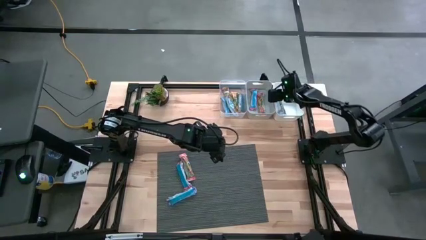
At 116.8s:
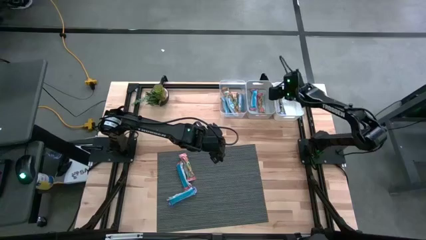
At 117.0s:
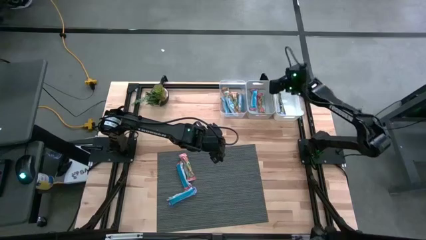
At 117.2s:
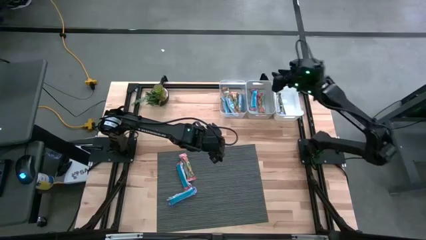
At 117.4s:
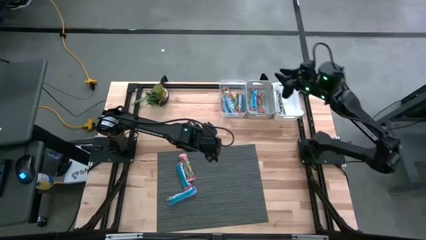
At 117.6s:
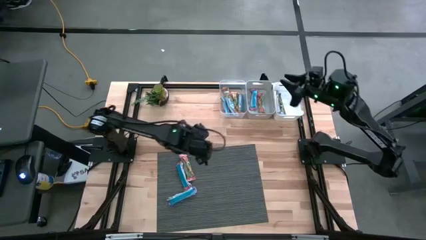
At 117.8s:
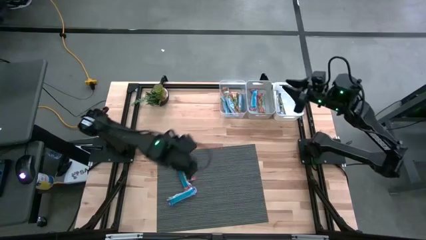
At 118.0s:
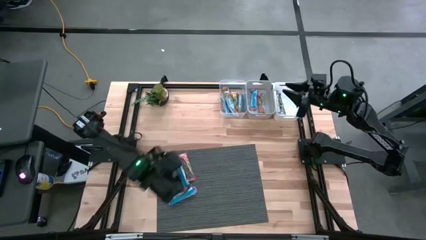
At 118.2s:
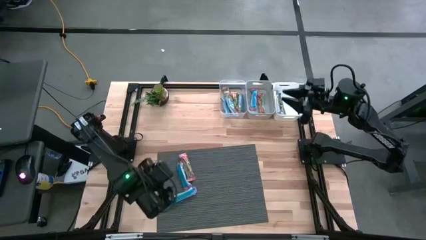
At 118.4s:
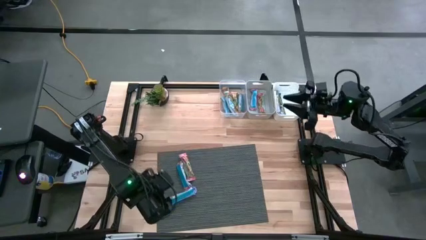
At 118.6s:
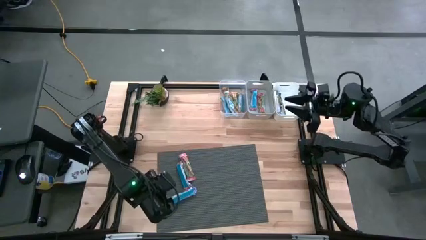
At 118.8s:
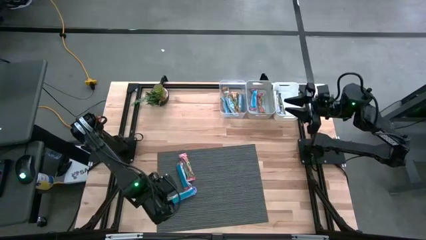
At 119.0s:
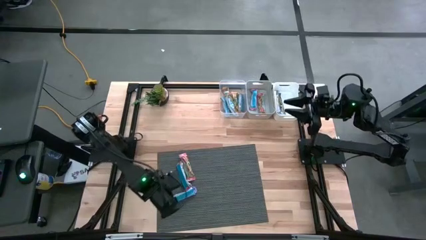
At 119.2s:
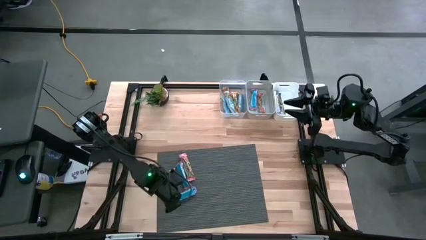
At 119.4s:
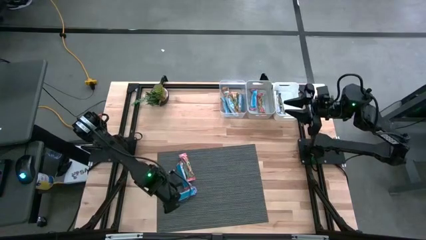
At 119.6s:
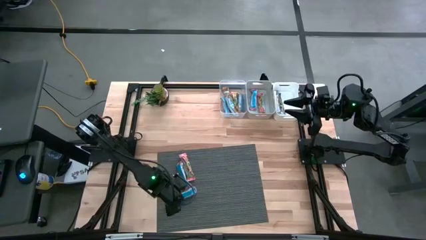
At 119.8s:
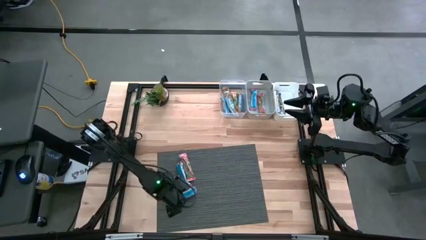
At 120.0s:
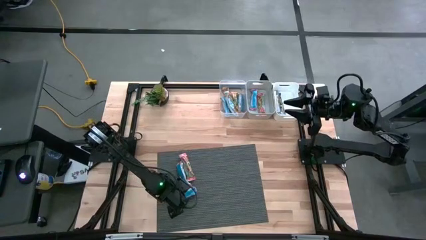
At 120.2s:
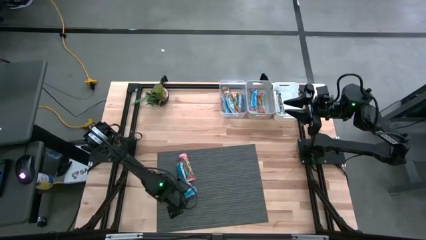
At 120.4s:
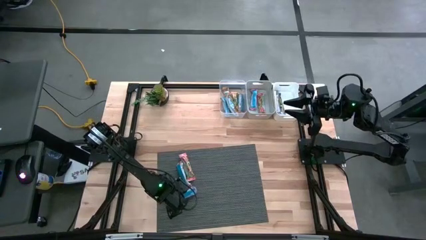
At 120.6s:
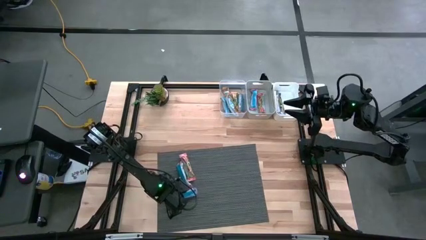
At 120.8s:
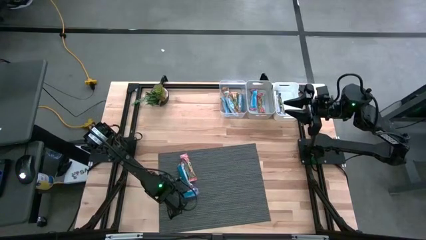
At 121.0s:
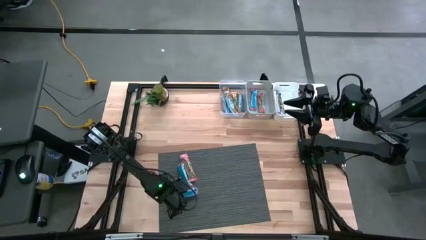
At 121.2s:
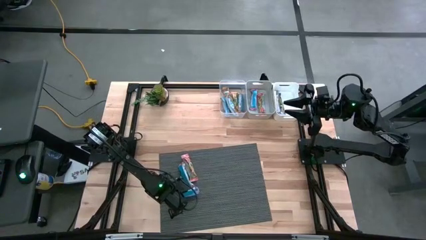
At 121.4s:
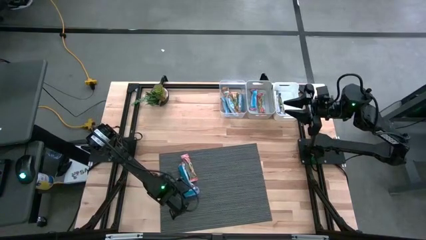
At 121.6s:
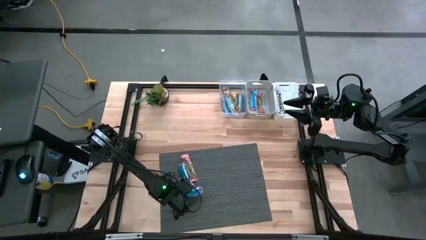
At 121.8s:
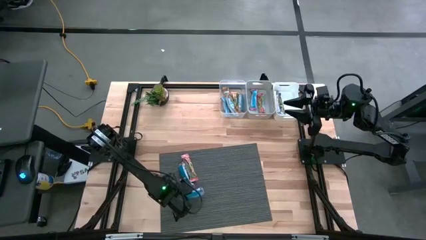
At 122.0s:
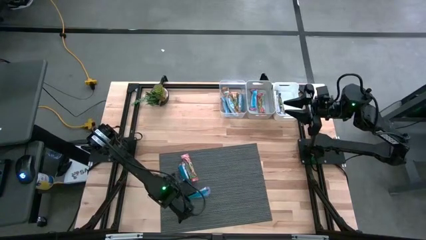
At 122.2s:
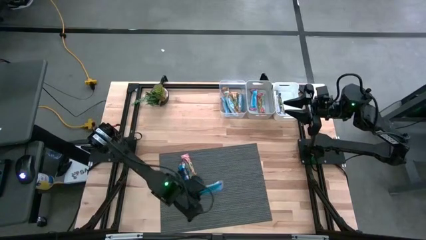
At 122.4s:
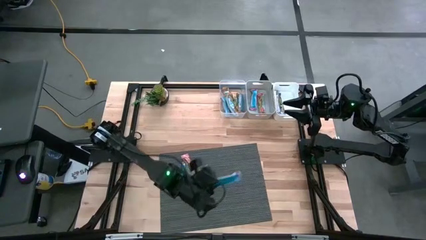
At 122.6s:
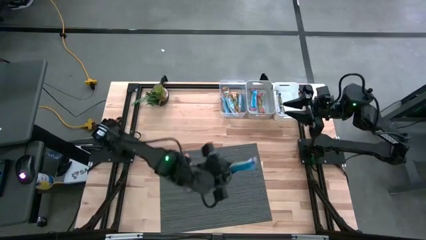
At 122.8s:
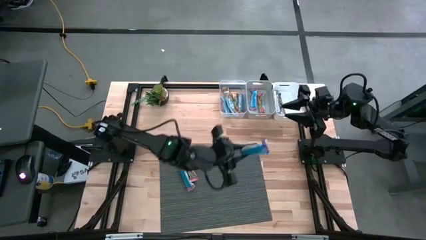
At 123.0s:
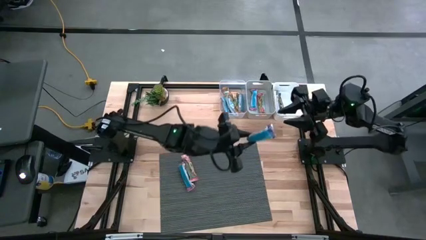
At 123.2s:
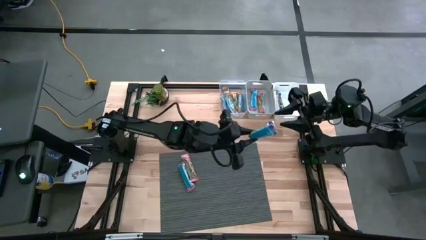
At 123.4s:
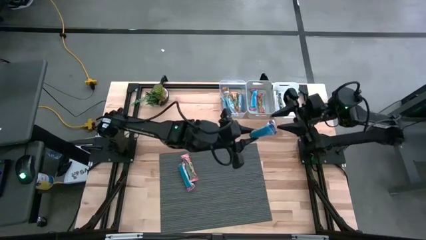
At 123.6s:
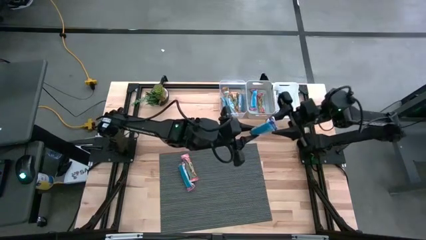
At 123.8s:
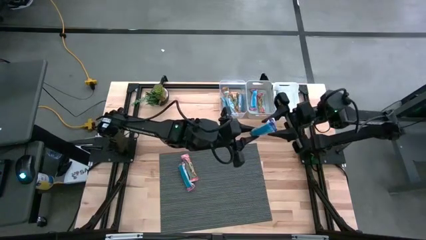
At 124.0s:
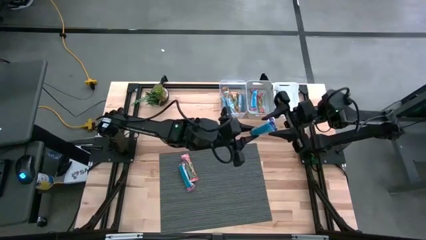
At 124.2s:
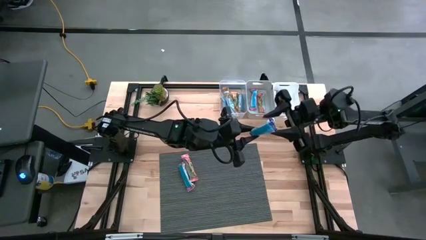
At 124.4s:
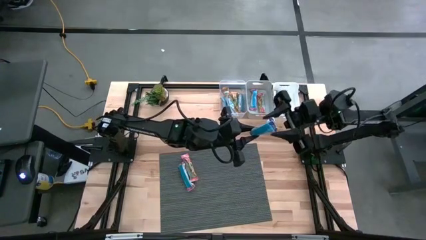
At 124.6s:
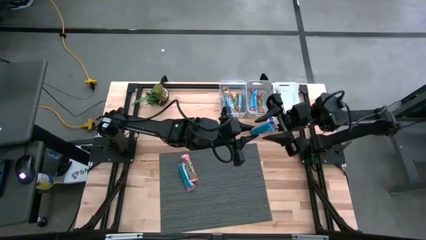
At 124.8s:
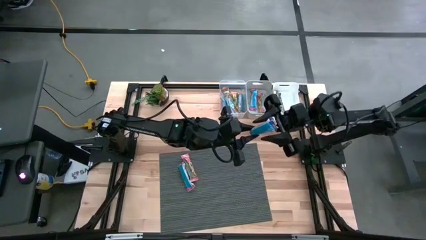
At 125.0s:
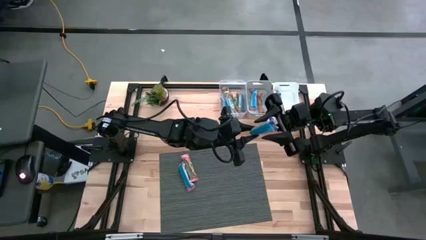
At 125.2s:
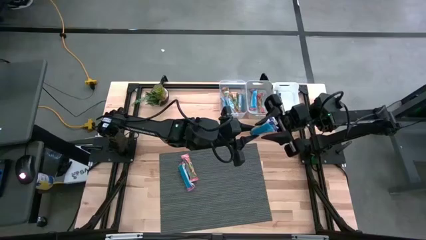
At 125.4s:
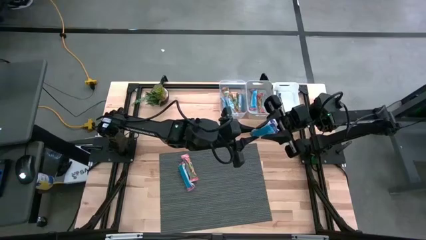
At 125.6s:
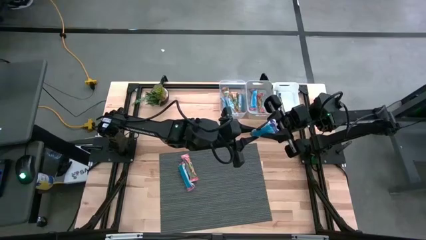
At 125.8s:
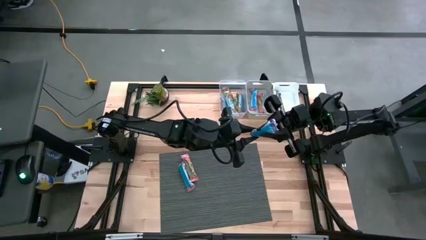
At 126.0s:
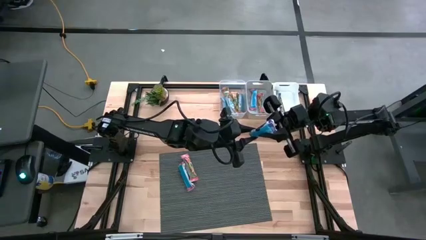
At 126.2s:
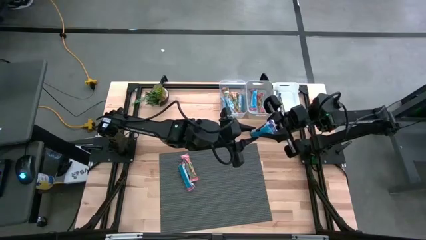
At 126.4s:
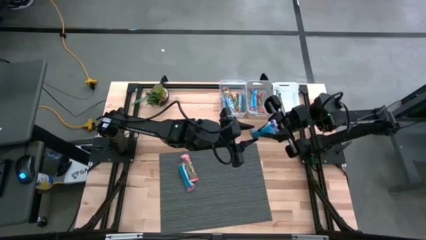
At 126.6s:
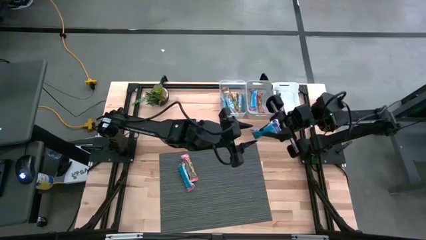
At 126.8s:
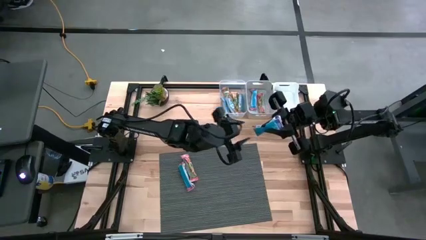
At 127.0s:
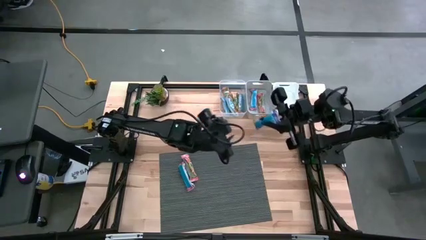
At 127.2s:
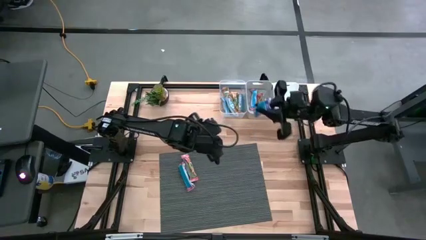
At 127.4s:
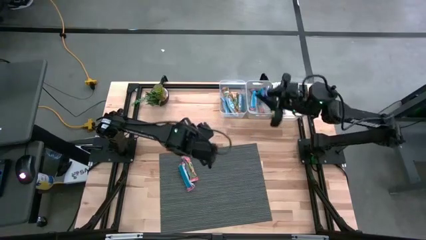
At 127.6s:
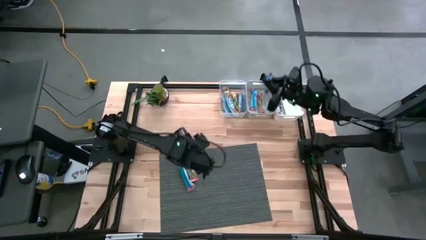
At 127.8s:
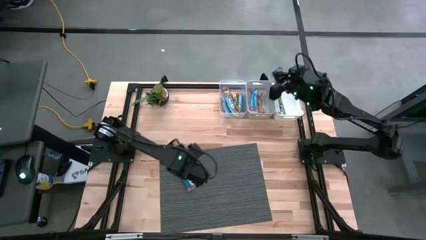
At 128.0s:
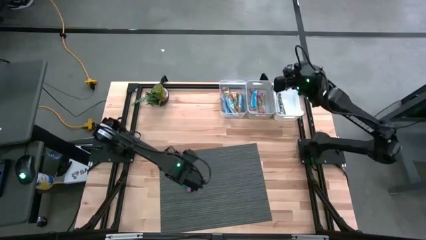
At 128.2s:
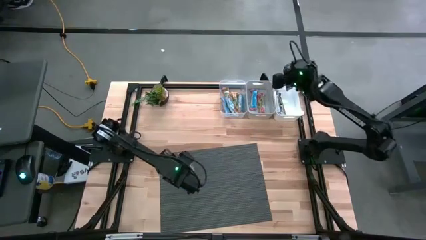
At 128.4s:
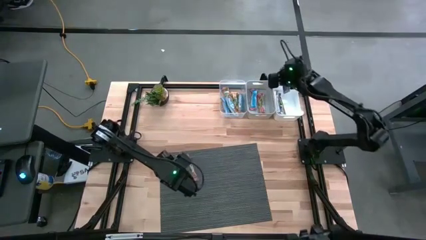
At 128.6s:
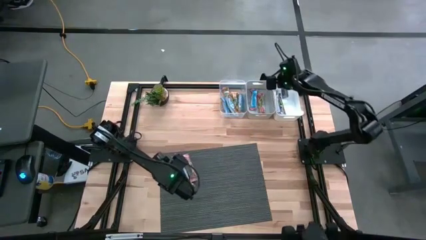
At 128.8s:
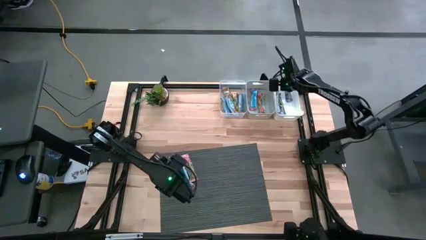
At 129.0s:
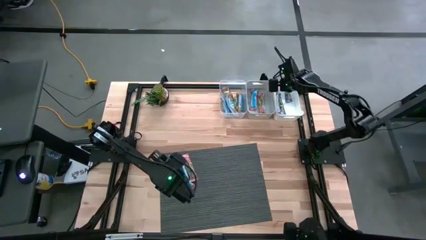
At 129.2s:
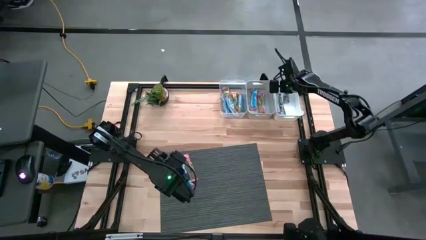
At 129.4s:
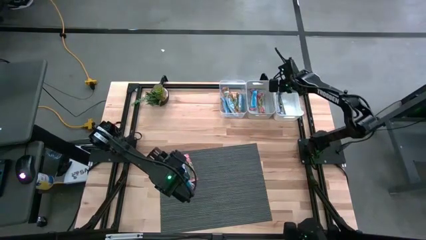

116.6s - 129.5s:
Task: Pick and place Granola Bars by type
Put the blue granola bar into the white bin

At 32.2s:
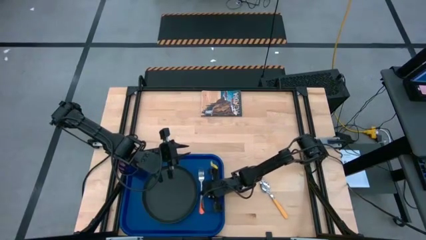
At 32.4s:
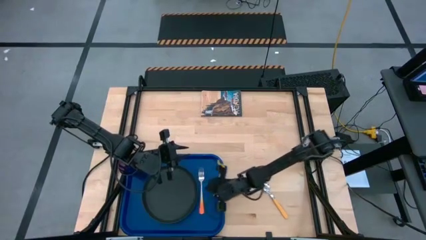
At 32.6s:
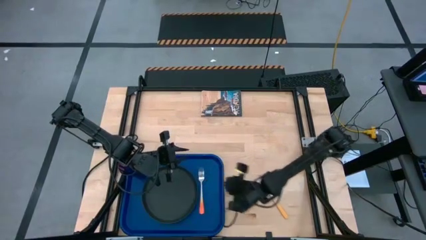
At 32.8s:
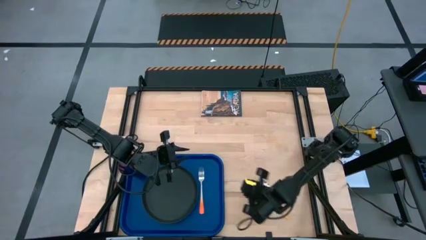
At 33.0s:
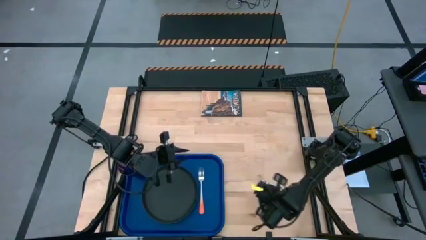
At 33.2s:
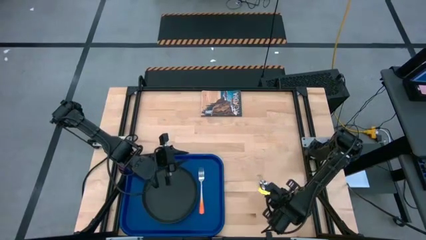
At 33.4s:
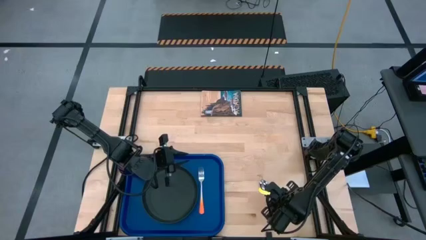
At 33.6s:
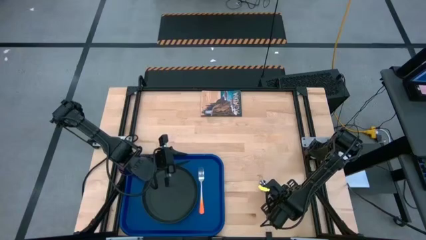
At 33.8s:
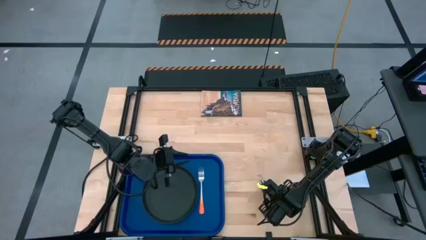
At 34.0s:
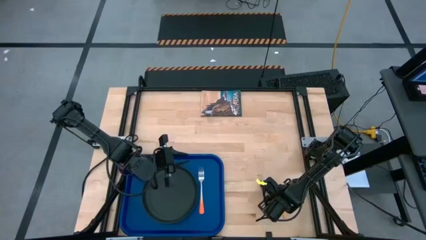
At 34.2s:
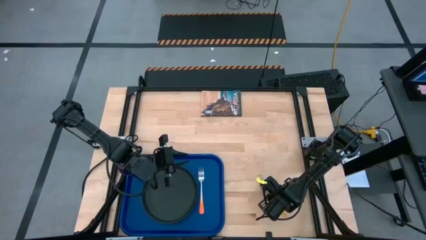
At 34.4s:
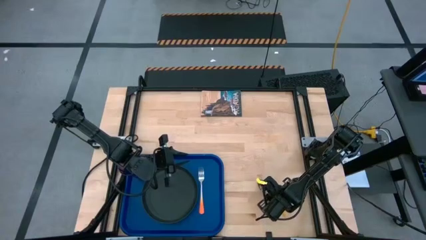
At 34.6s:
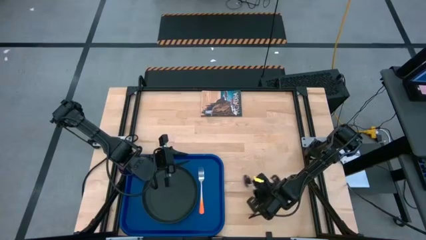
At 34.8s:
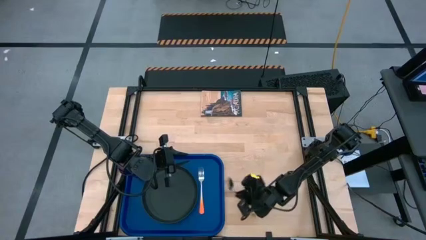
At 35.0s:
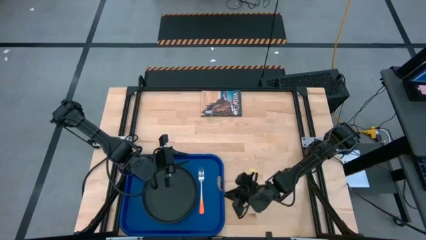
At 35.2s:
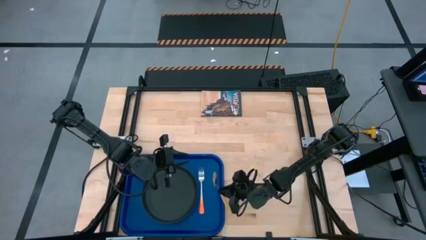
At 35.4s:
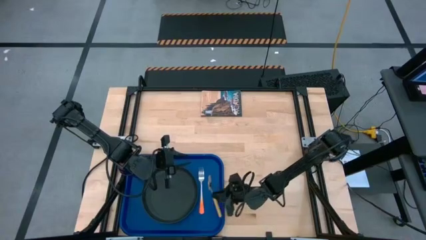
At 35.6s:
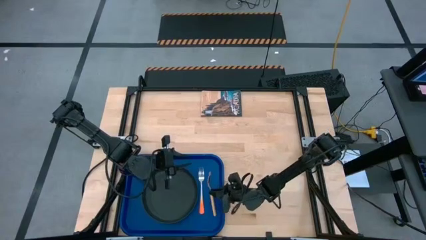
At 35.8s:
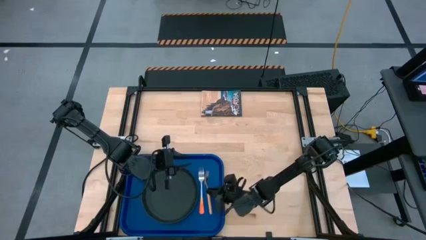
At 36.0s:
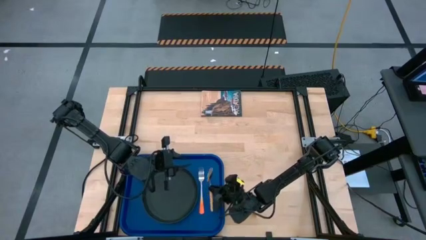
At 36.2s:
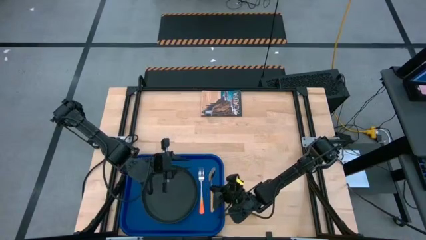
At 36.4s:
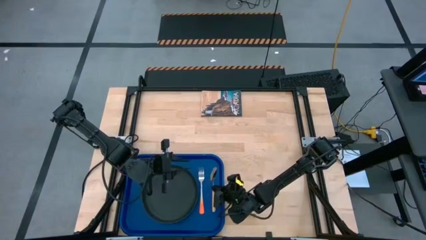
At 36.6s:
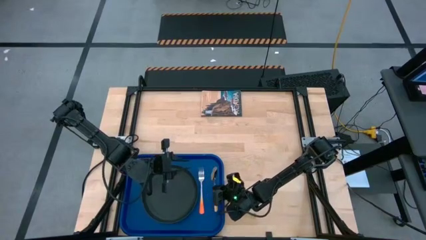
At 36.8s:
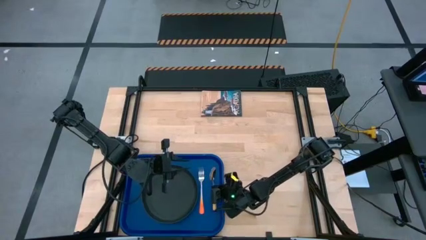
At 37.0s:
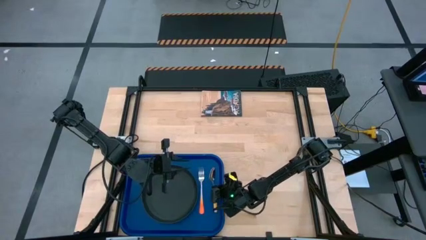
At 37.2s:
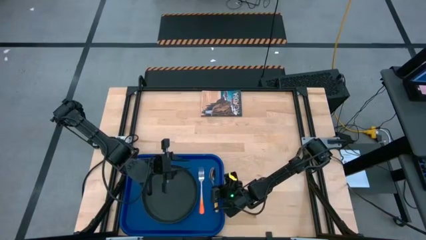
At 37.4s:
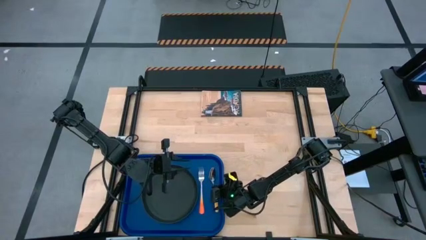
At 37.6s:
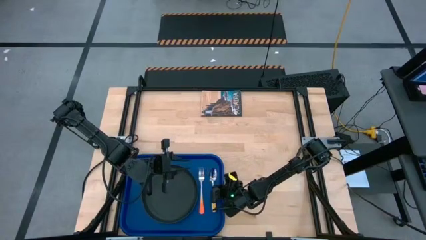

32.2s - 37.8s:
Task: Pick and place plate/cup/fork/spoon on tray
Put the yellow spoon on the blue serving tray to the right of the orange fork
